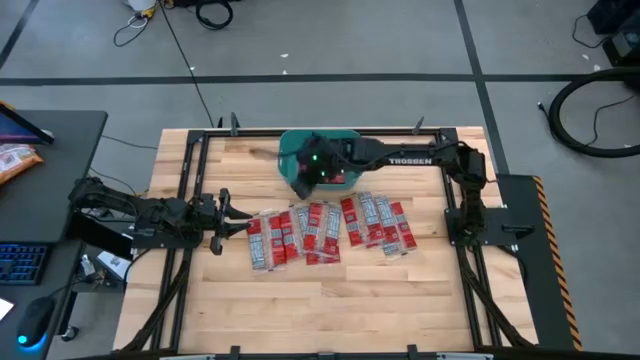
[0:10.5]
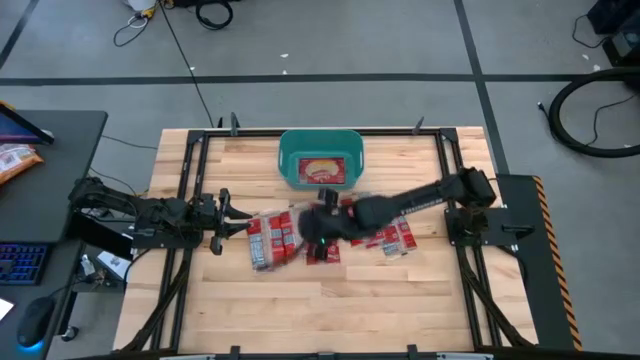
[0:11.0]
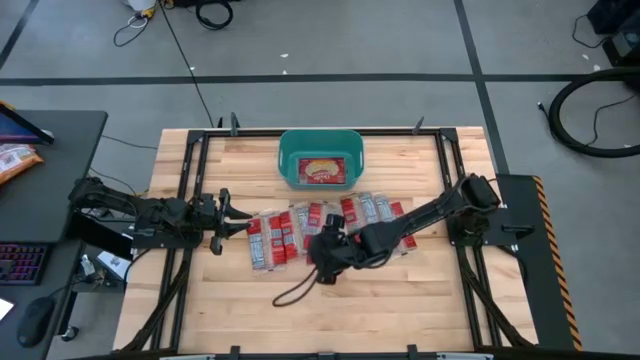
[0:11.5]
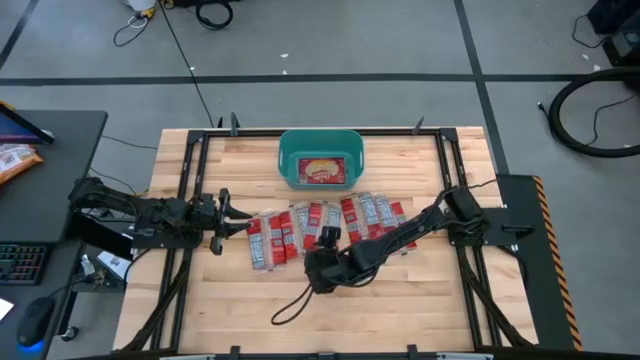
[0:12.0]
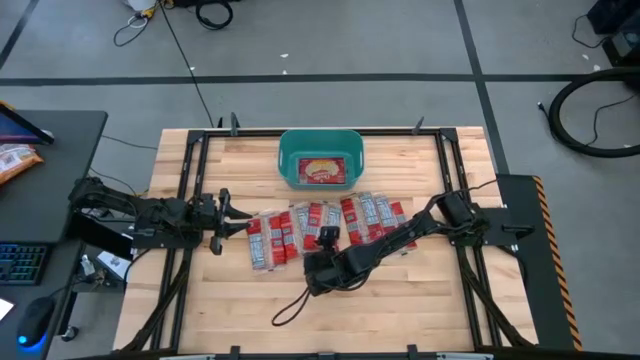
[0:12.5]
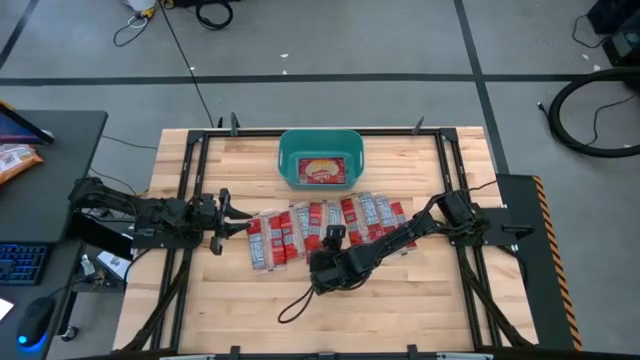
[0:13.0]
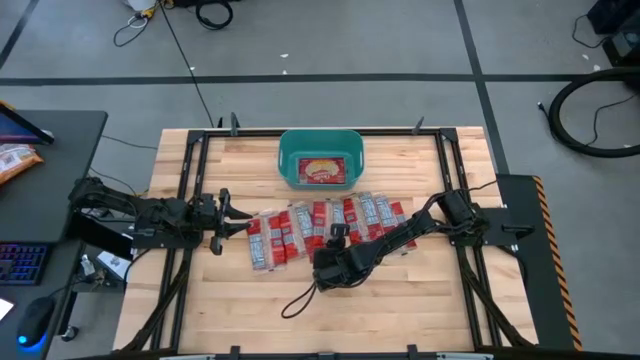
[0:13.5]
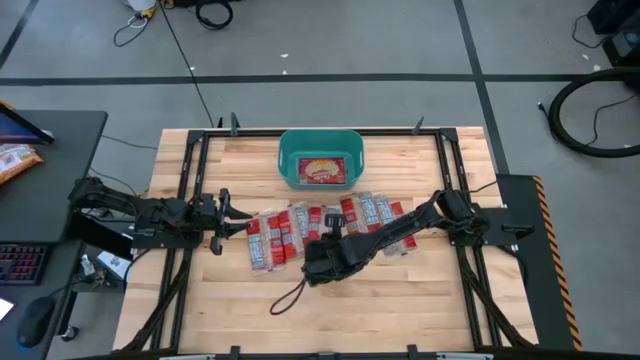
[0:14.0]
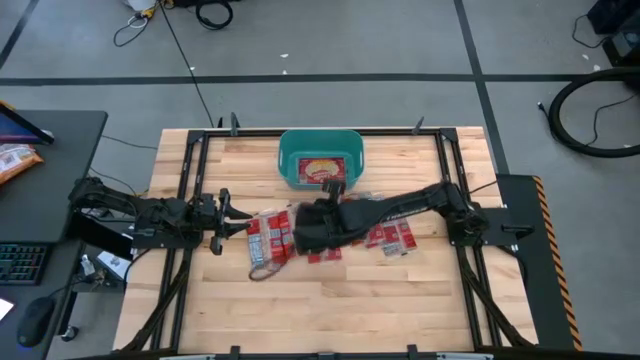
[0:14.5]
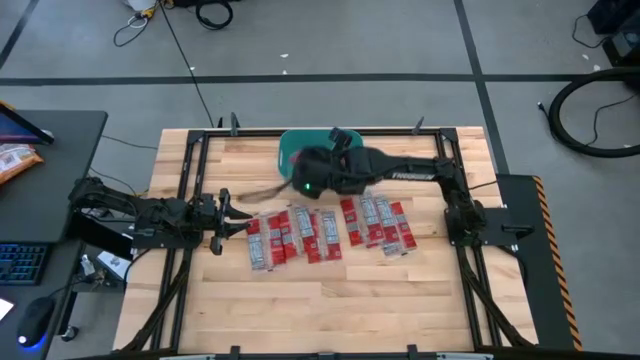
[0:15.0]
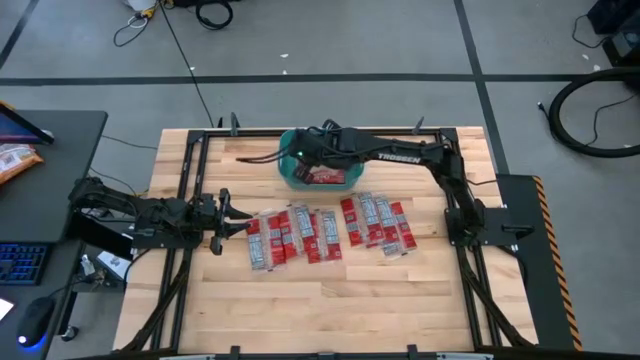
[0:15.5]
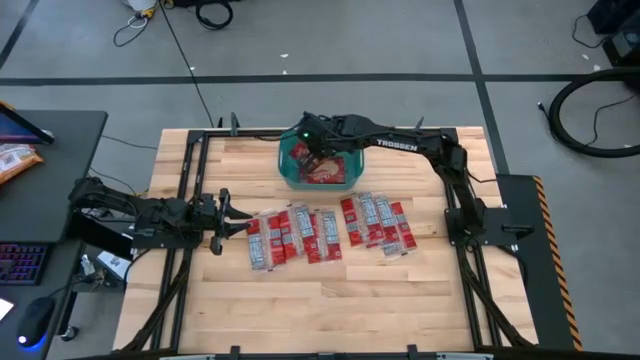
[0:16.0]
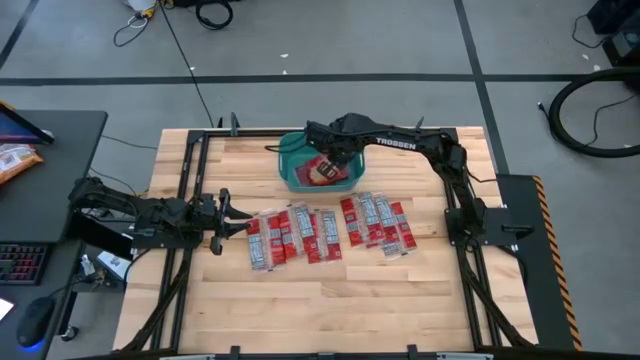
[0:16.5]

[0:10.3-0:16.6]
Task: Sort popcorn bags into baskets
Put the red popcorn bag into the blue bin

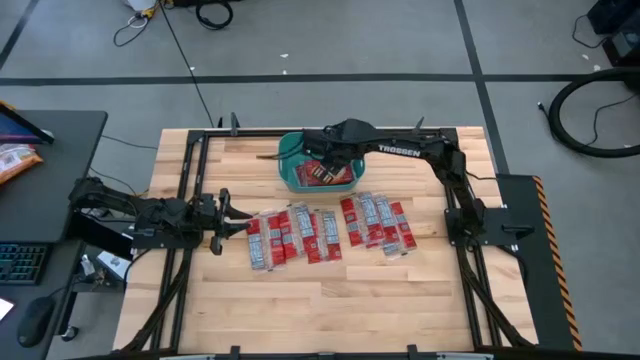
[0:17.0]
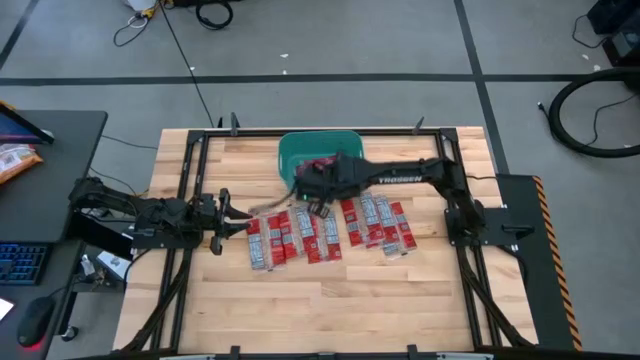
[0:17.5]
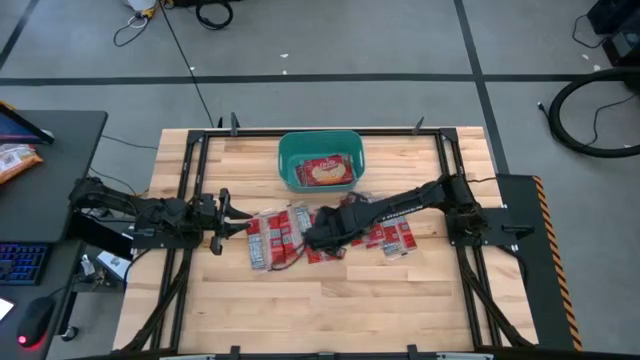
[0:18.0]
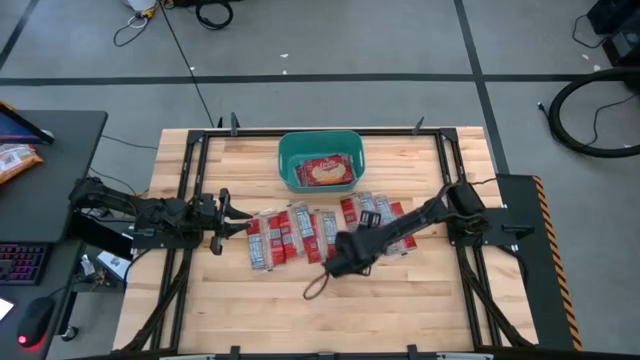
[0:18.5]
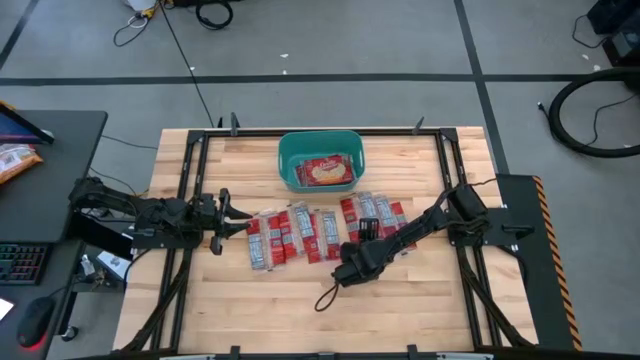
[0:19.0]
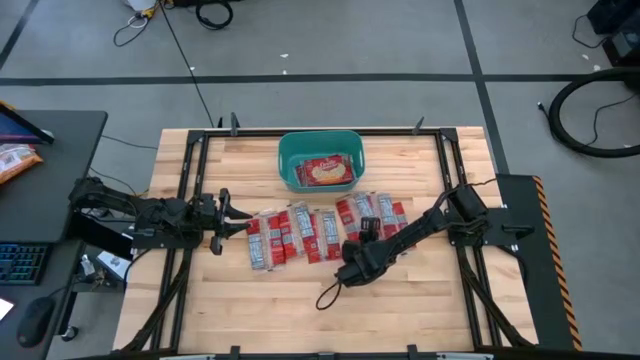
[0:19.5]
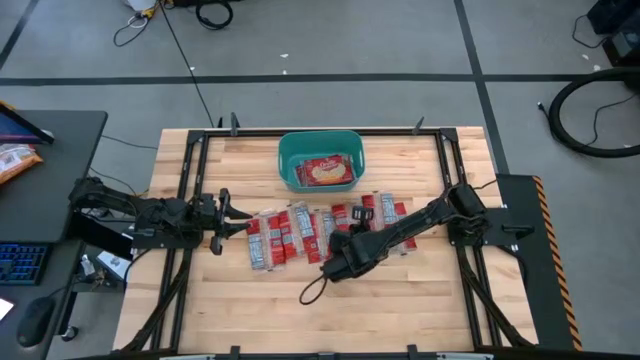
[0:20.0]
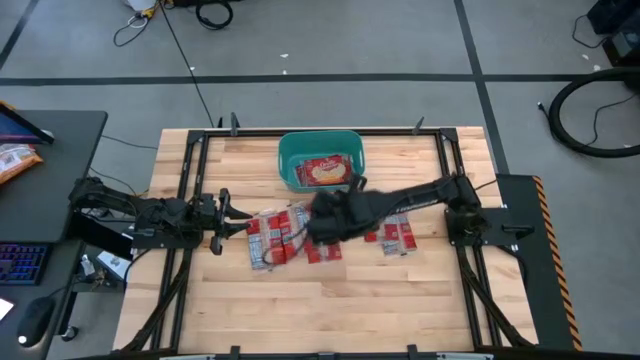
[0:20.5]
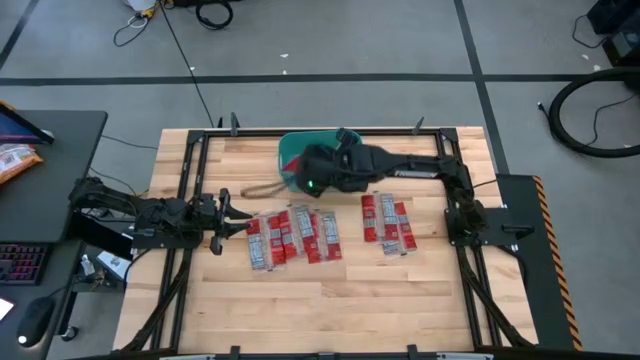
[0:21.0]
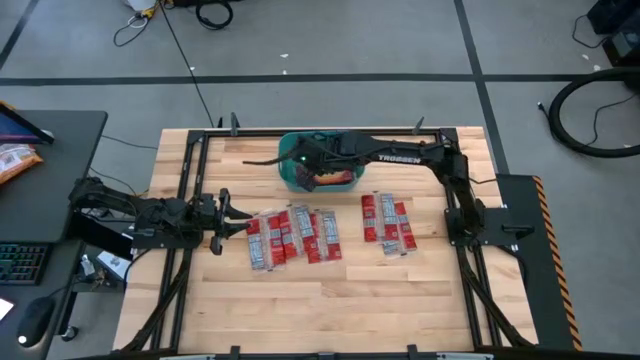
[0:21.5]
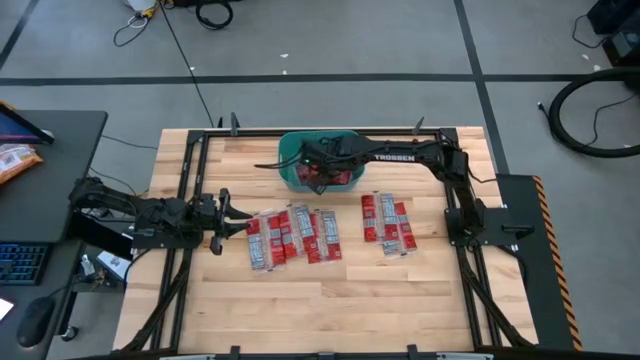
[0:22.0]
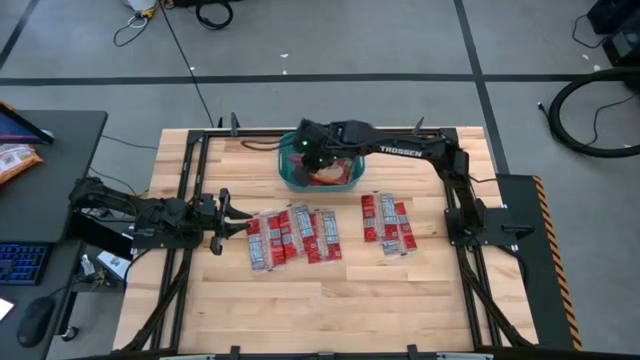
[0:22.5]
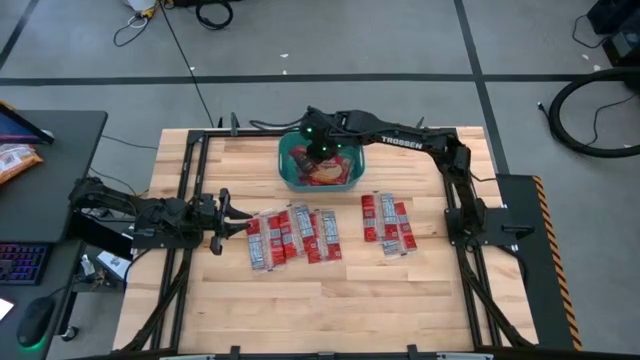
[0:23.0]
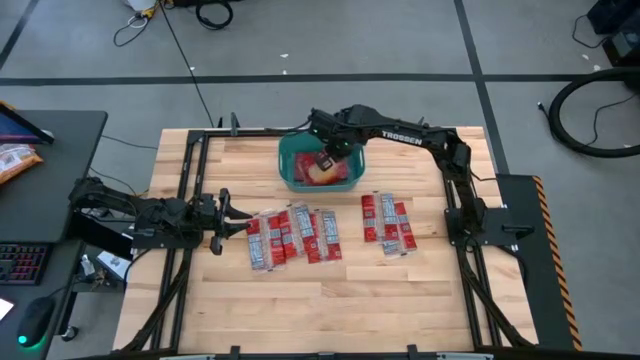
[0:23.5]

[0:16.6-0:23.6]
Put the red popcorn bag into the blue bin

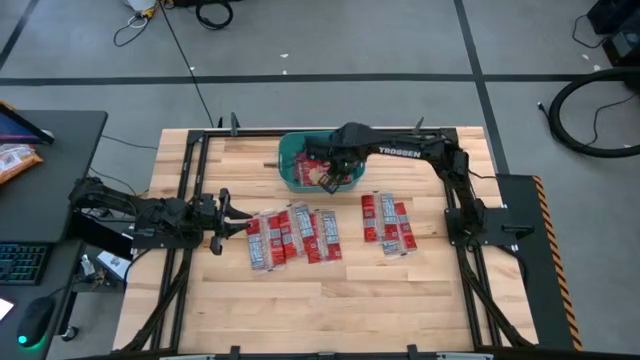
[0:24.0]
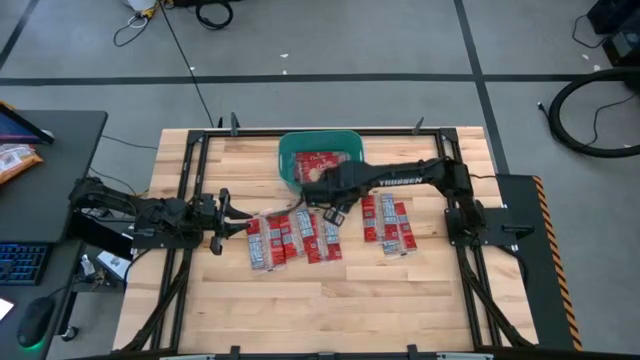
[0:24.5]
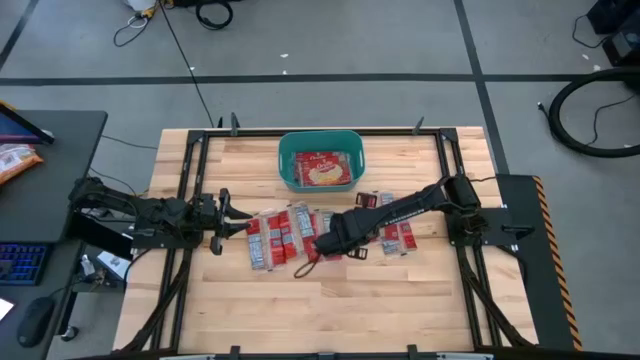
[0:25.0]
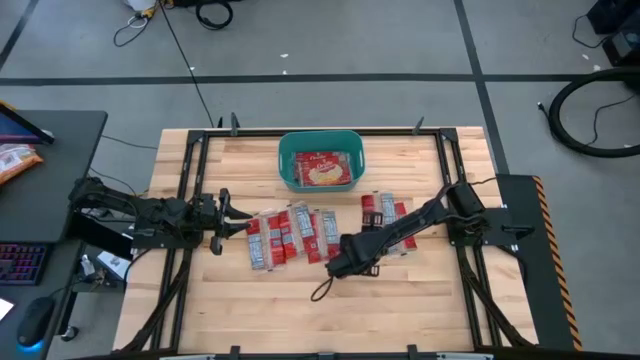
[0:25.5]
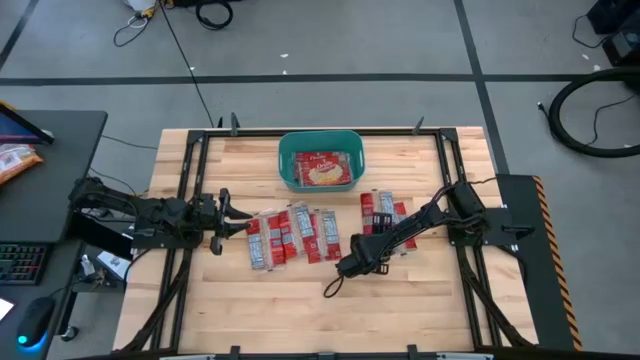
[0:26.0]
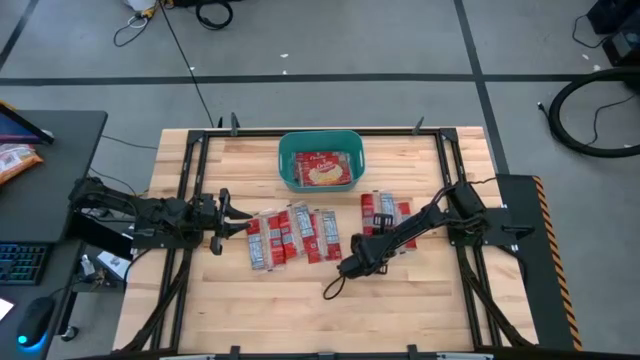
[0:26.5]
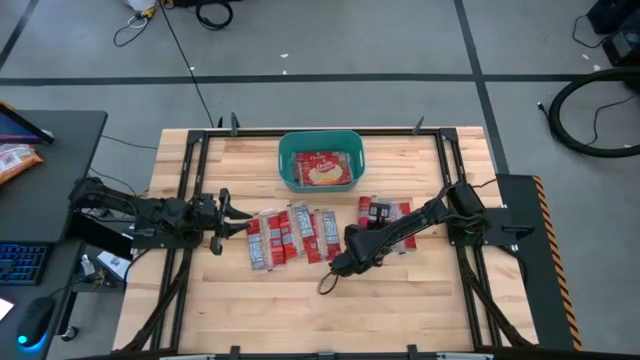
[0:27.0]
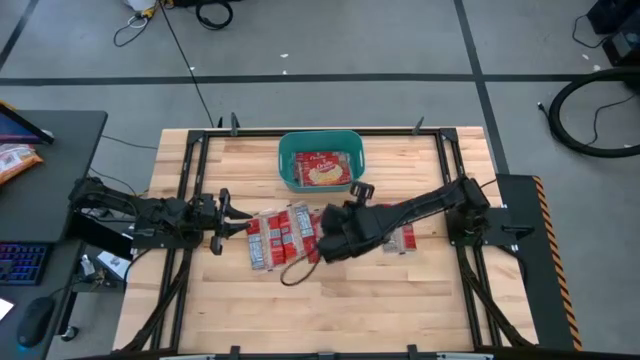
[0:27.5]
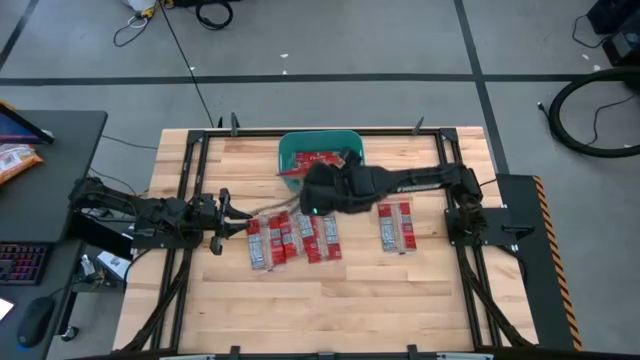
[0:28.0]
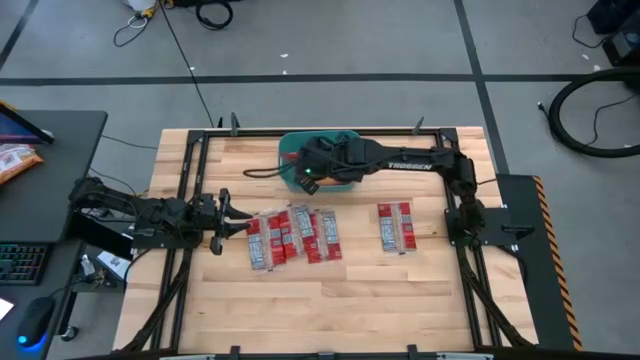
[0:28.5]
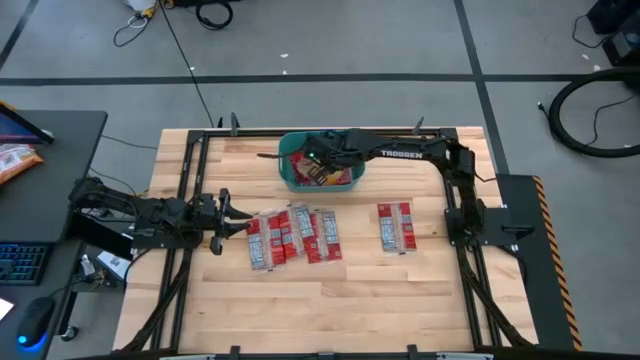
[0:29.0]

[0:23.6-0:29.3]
Put the red popcorn bag into the blue bin

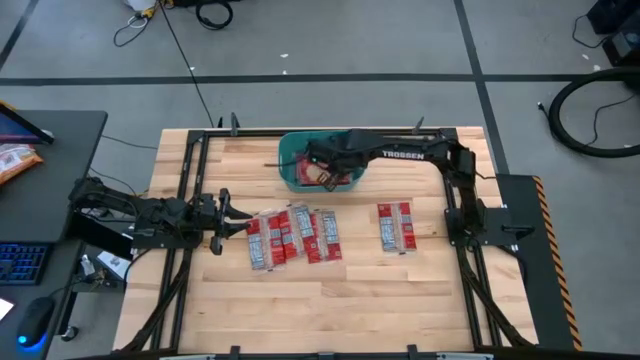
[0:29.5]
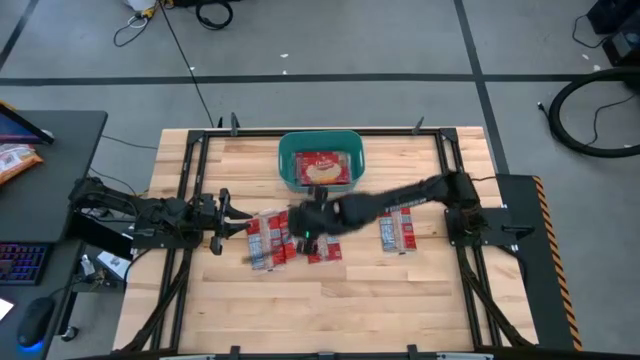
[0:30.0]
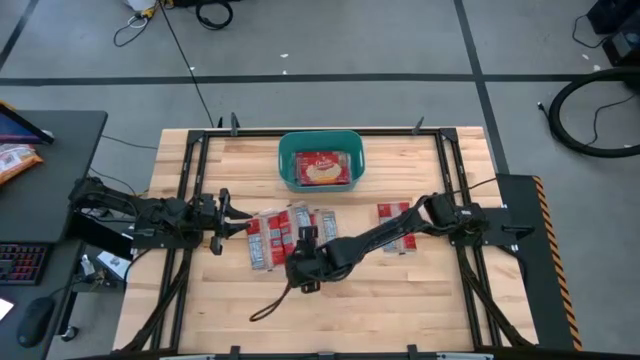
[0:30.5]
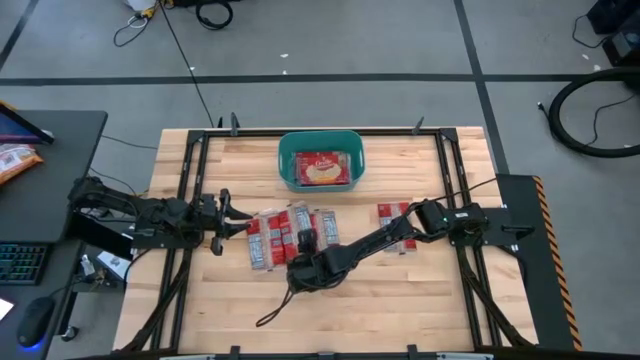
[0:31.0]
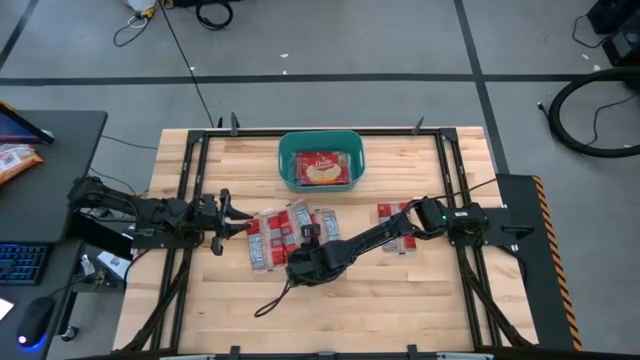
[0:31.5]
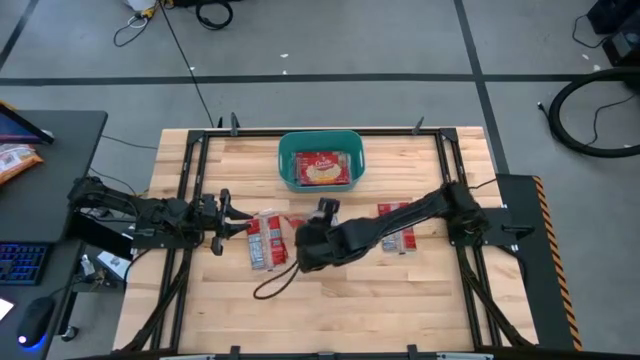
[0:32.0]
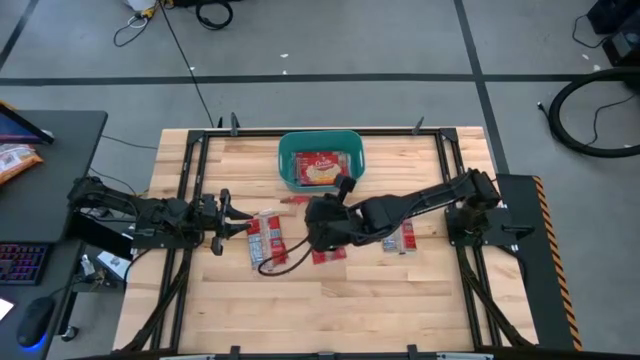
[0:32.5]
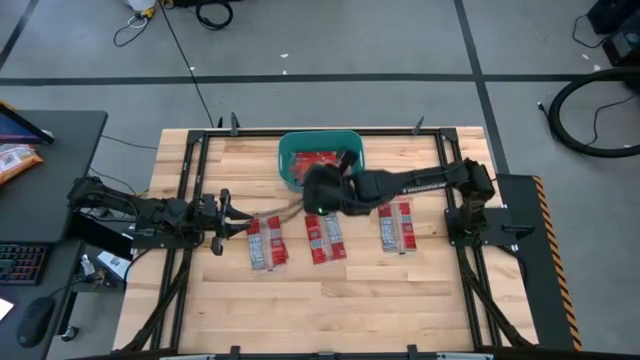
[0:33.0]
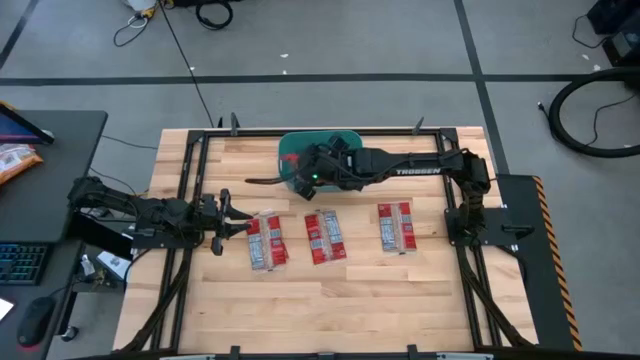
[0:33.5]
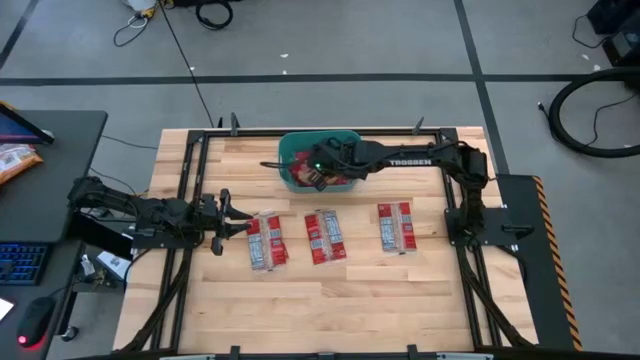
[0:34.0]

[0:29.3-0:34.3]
Put the red popcorn bag into the blue bin
